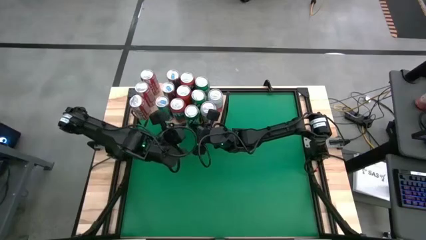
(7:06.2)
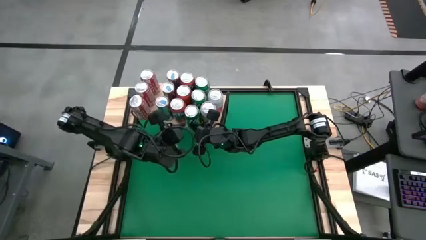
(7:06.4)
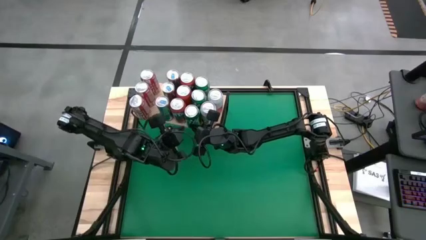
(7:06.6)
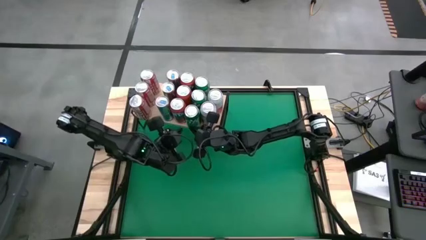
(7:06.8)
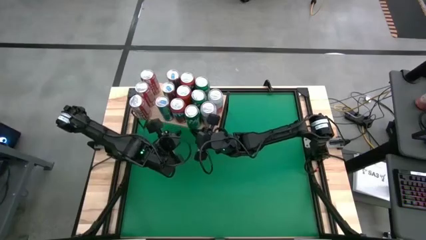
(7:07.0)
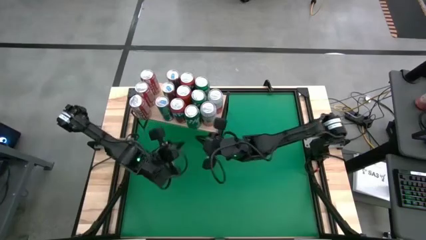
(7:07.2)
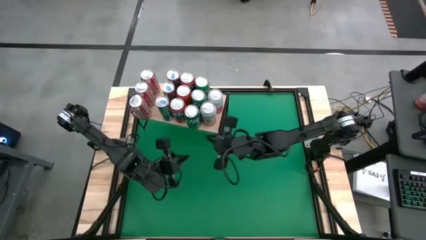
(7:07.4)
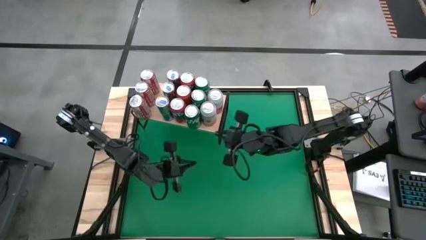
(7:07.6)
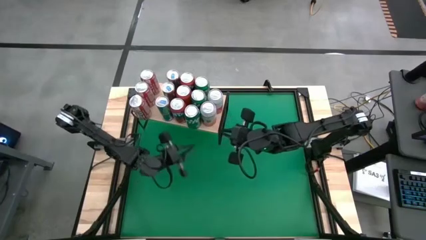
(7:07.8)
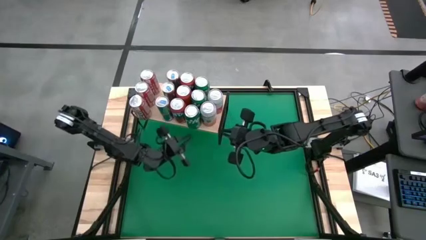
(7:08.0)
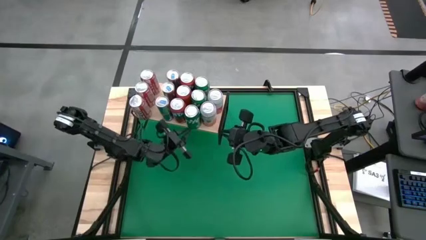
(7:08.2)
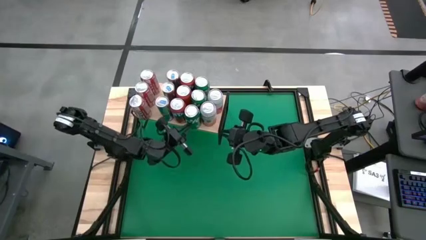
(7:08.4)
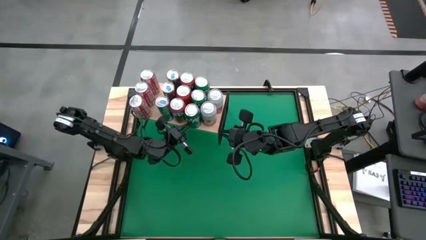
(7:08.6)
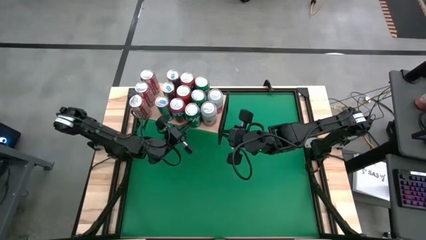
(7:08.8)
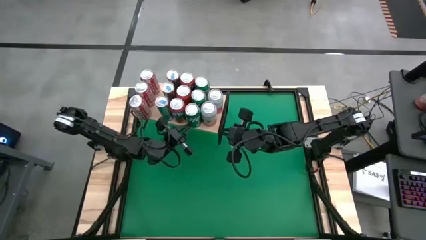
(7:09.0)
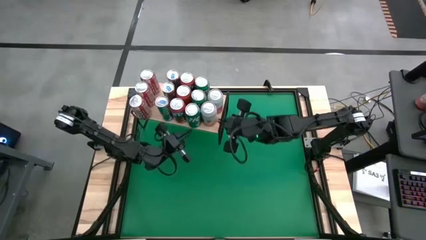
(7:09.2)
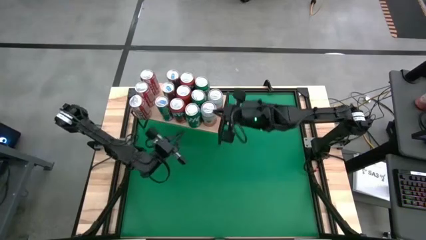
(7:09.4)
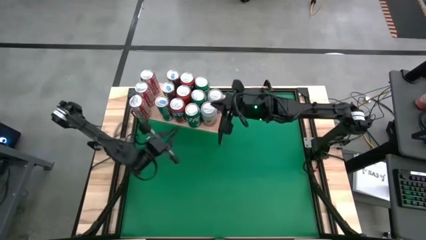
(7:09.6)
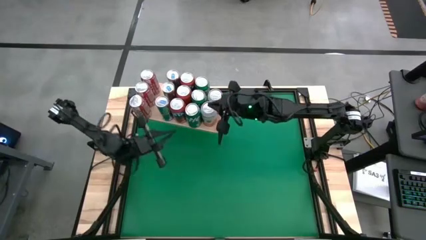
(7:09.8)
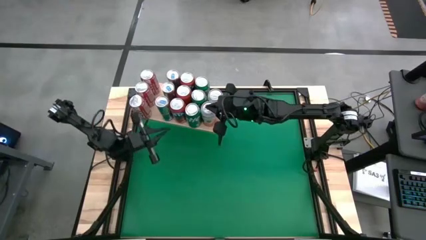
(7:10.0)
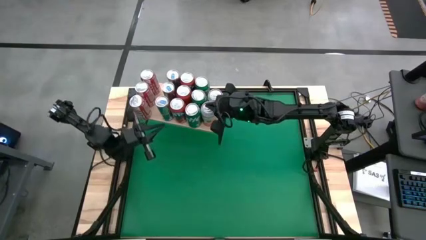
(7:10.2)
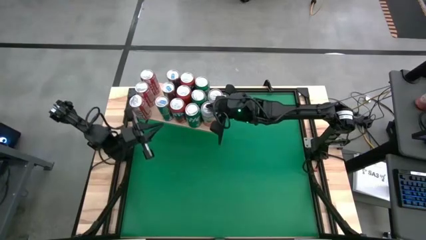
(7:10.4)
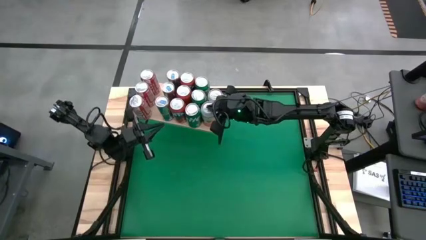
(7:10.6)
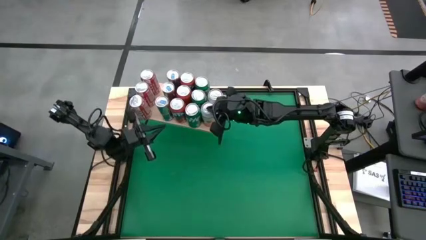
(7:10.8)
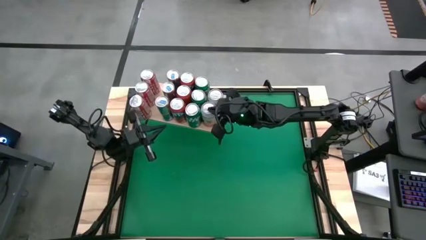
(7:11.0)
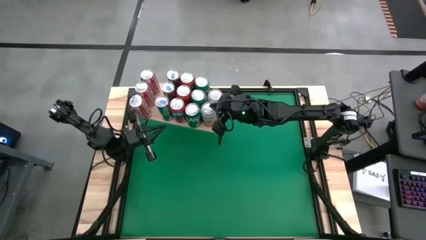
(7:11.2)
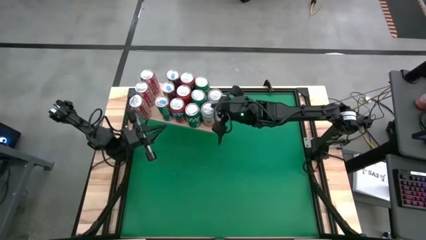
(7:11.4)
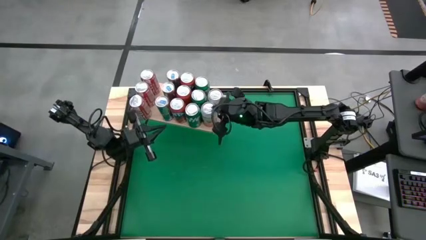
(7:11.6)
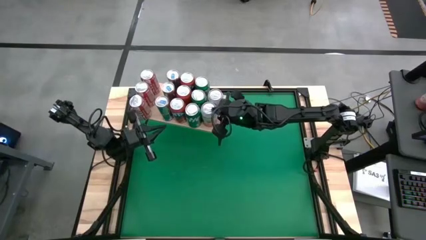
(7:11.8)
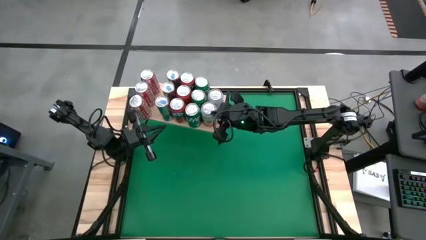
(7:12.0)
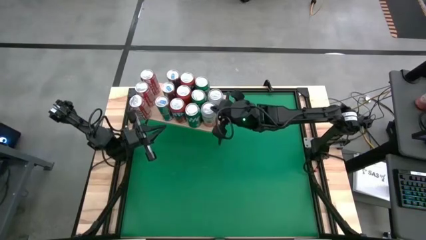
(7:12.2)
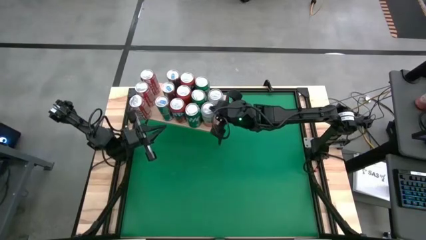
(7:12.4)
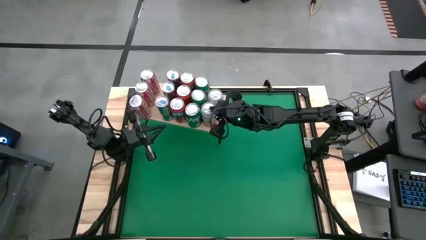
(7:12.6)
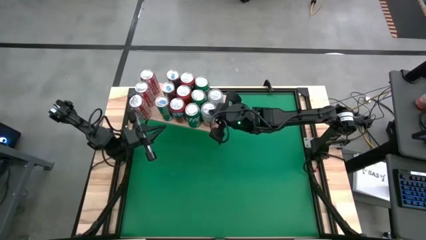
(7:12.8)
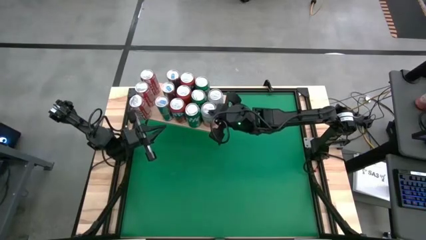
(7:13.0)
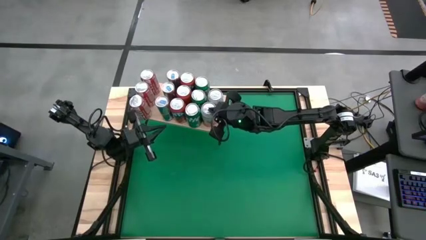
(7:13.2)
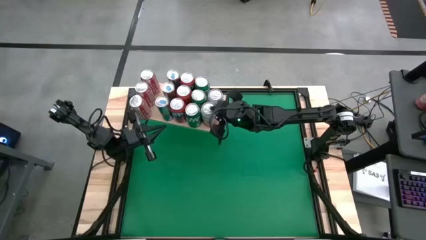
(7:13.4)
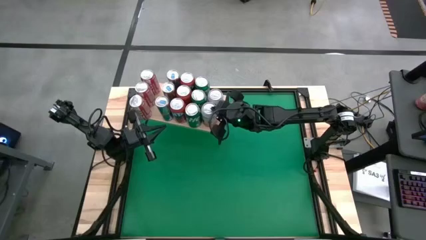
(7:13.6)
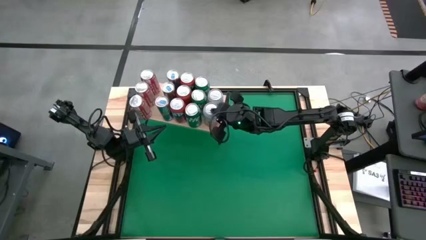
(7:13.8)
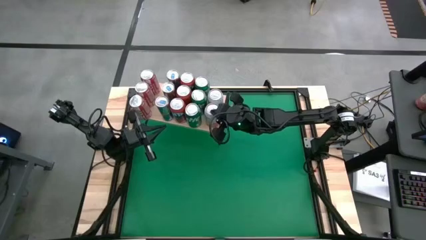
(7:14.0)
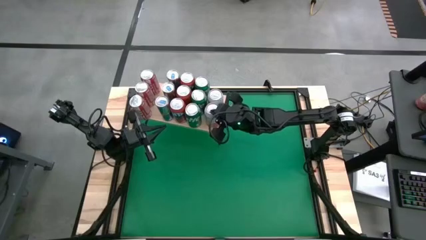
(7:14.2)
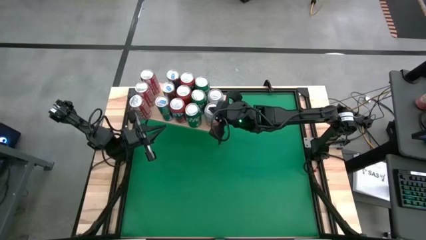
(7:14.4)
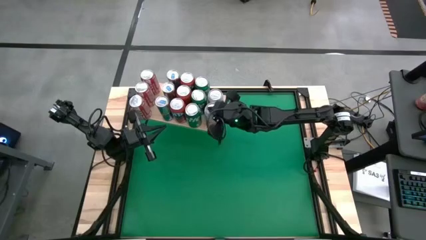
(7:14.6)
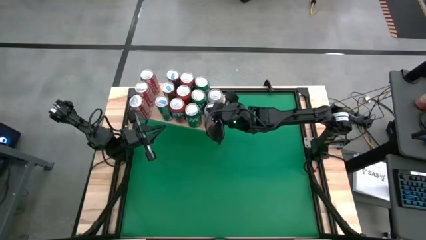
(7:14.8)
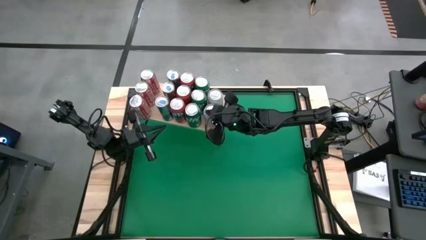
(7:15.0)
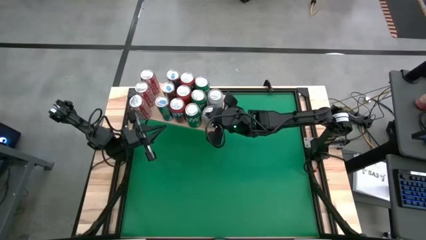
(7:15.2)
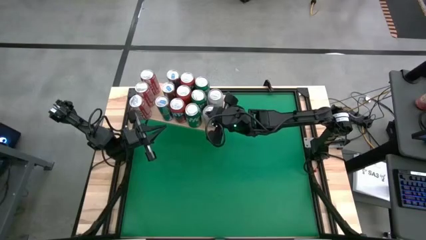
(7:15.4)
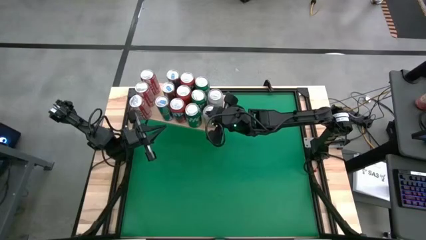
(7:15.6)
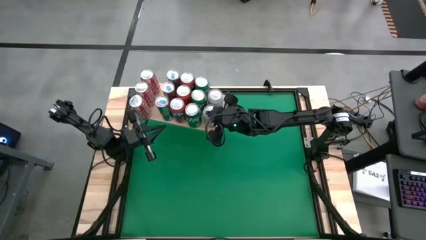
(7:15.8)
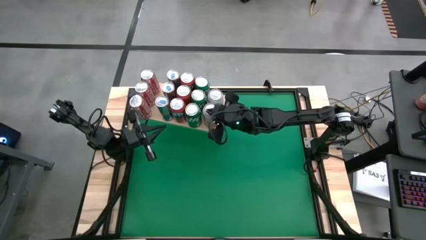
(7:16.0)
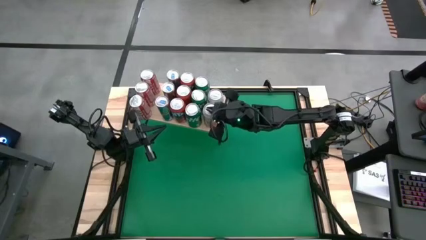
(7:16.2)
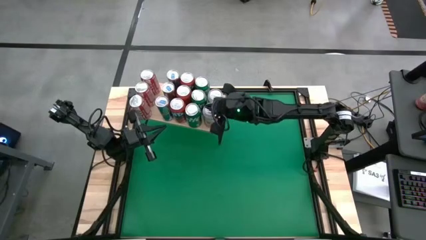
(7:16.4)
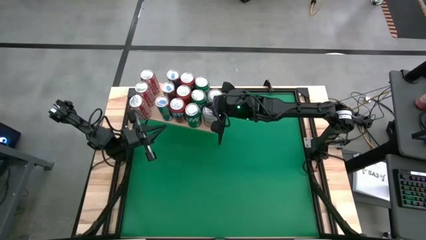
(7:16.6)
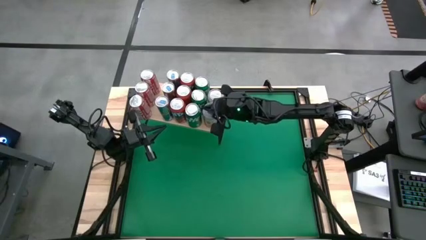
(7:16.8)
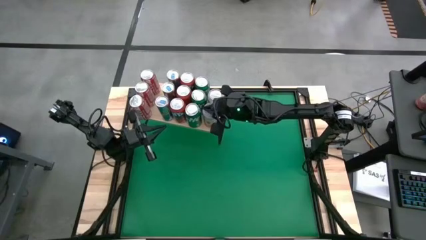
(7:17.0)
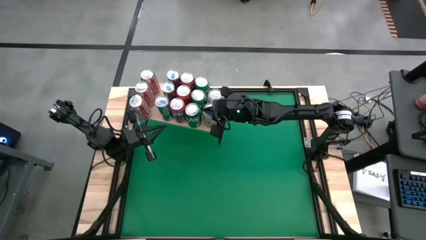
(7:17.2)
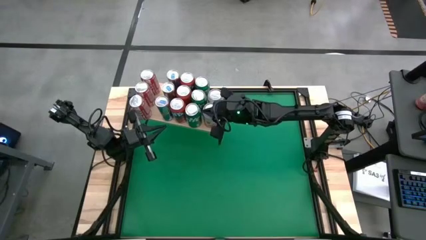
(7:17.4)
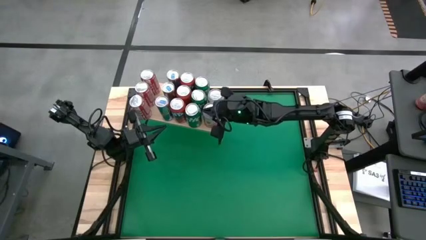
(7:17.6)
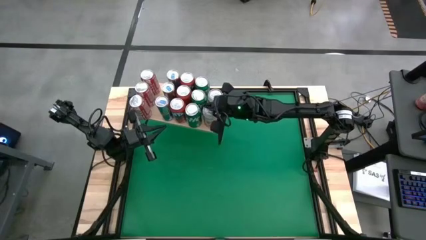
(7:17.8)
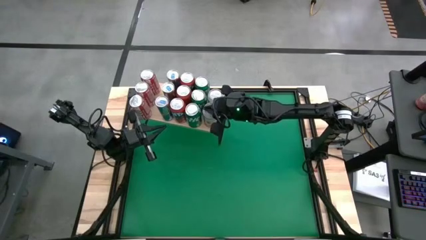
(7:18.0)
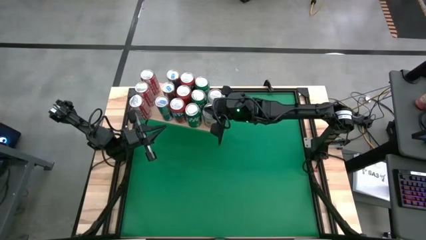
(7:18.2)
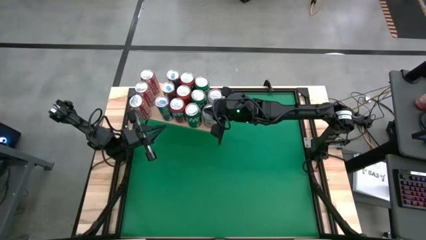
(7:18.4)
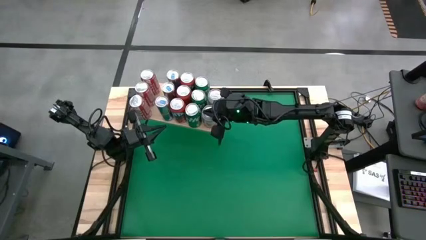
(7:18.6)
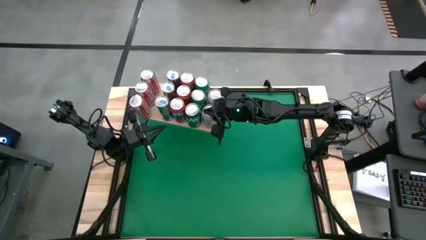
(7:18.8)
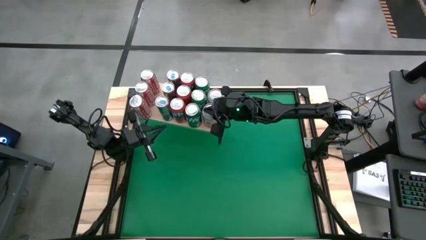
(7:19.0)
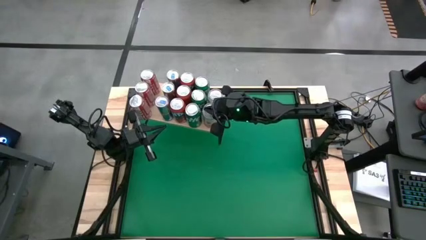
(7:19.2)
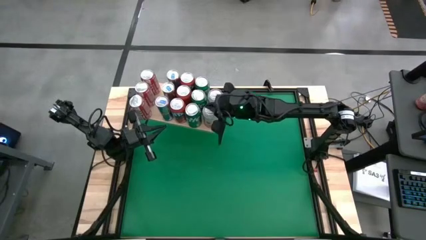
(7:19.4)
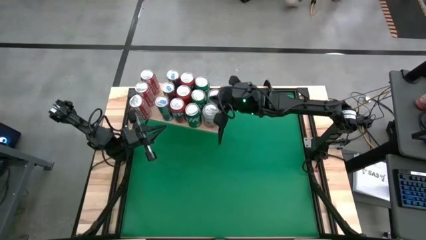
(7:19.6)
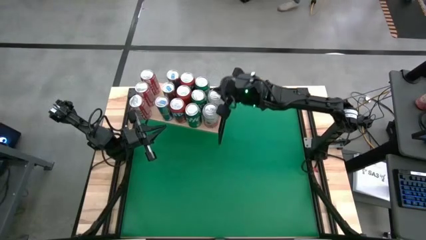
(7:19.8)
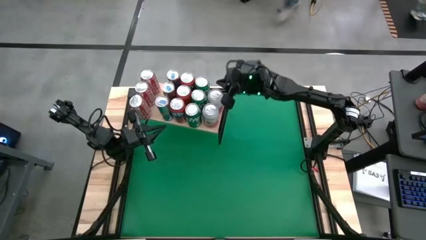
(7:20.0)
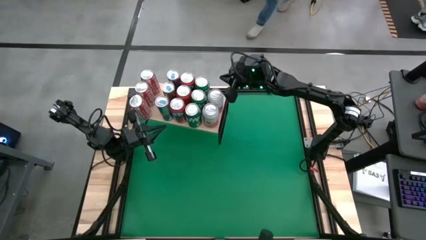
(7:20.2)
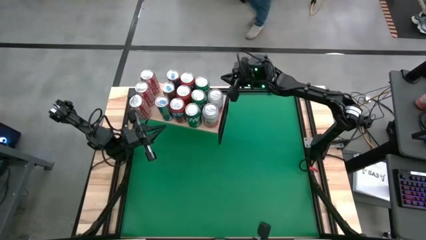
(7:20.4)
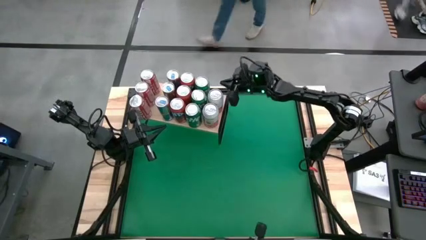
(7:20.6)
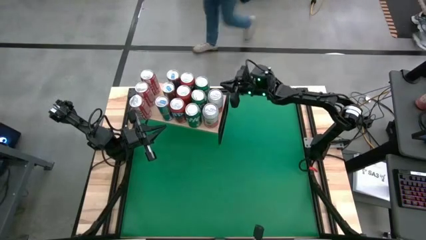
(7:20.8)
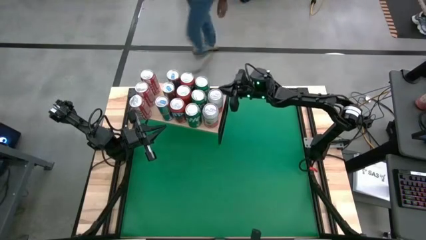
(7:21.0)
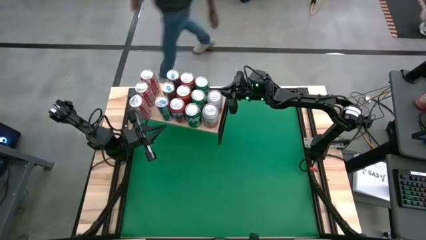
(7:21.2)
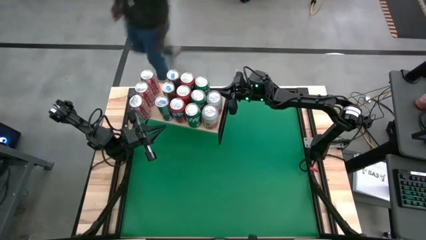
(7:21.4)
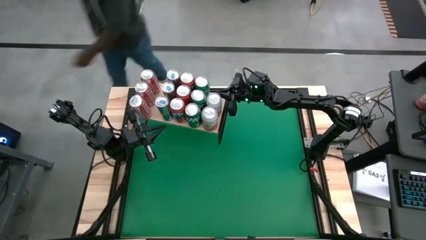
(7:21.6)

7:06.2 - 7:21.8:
Task: Place canned beverage on shelf
Put the green soda can on the shelf aligned with the other green soda can
